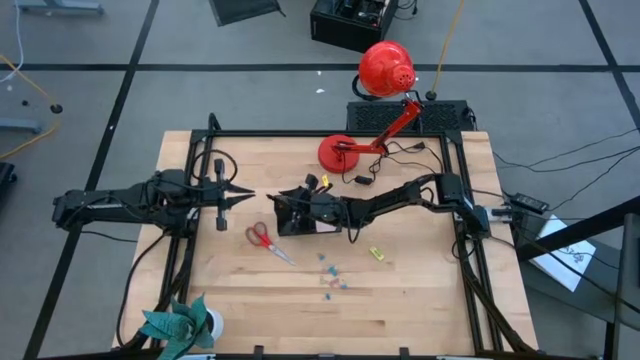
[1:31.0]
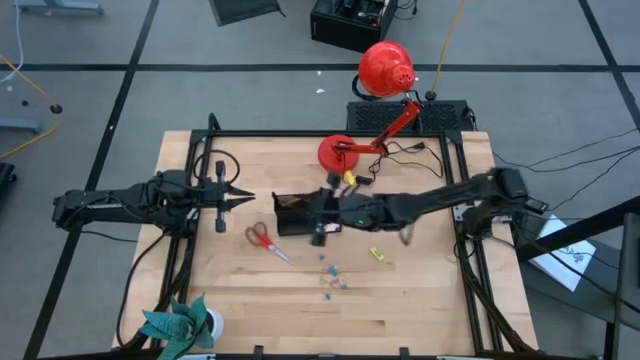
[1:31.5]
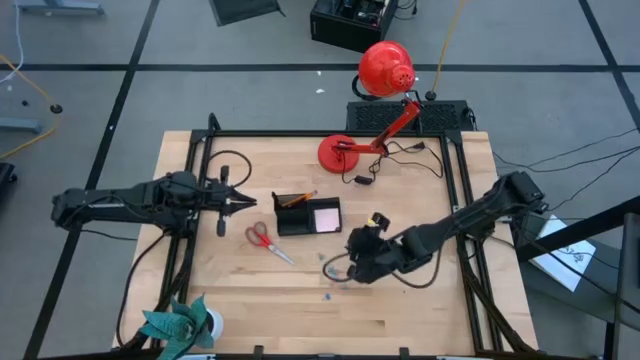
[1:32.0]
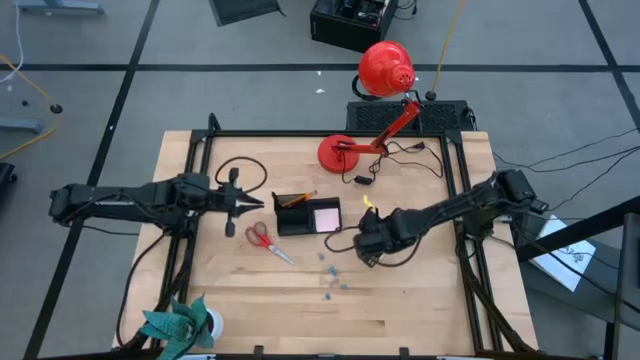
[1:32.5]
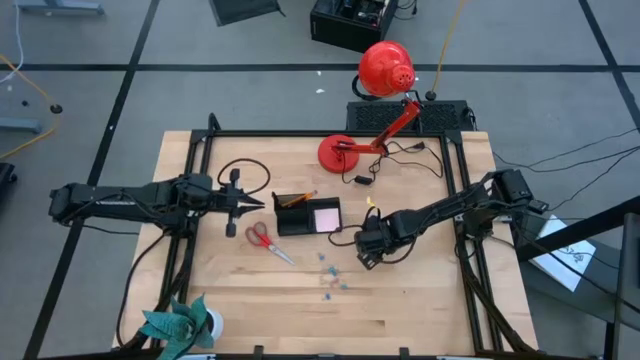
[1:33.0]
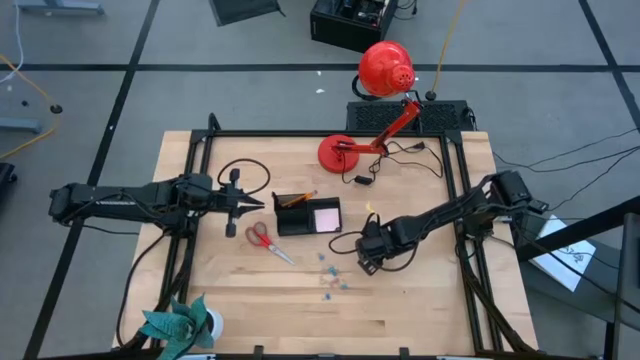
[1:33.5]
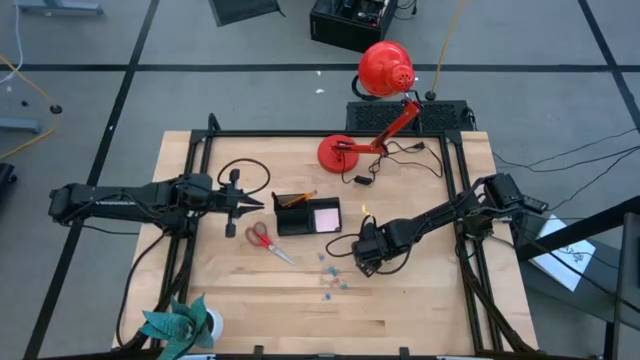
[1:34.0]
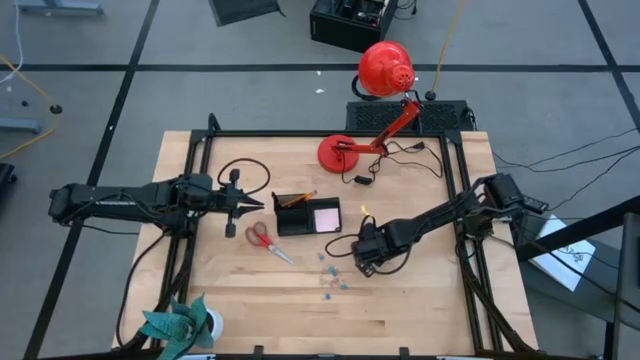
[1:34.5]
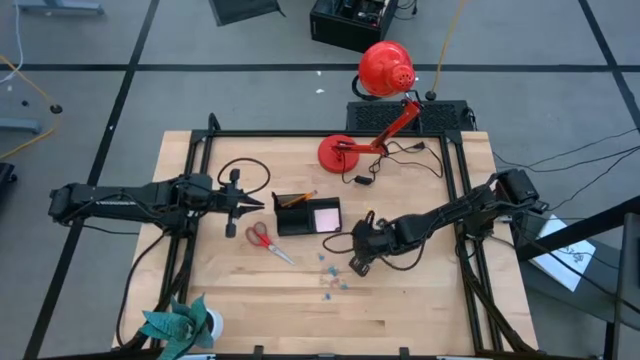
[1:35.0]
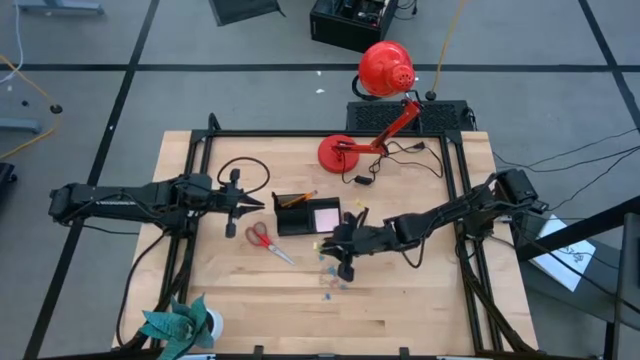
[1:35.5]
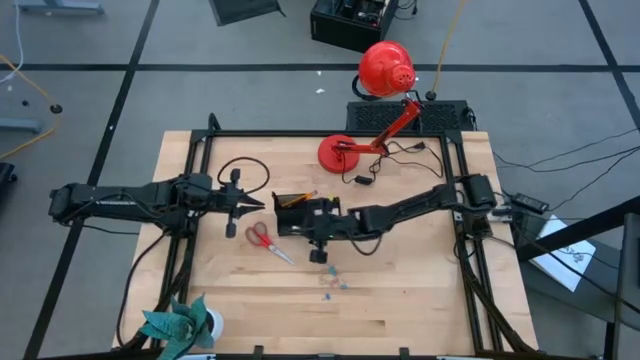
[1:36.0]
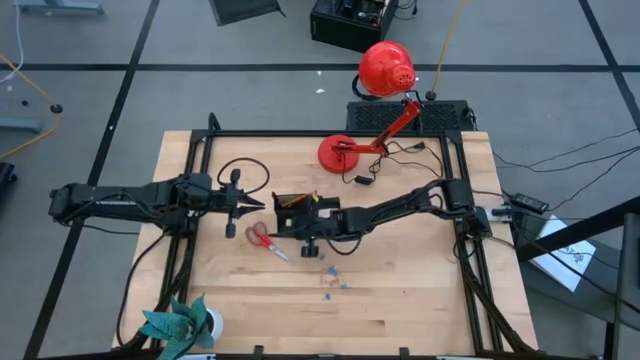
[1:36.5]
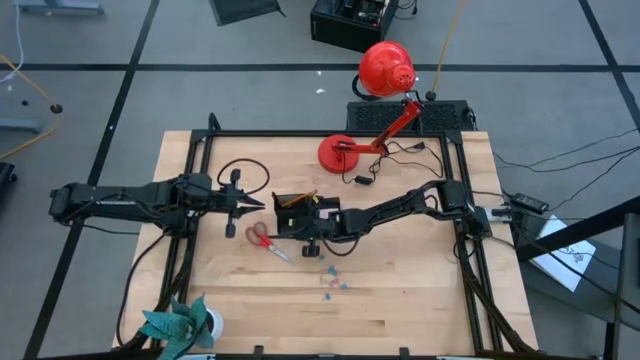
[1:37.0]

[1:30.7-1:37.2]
Task: Pick and place office supplies into organizer
Put the yellow eraser into the mesh desk organizer

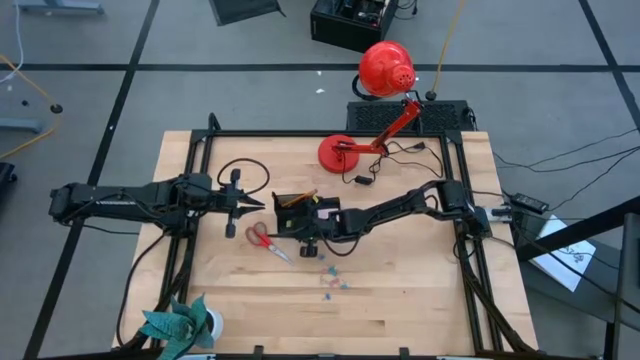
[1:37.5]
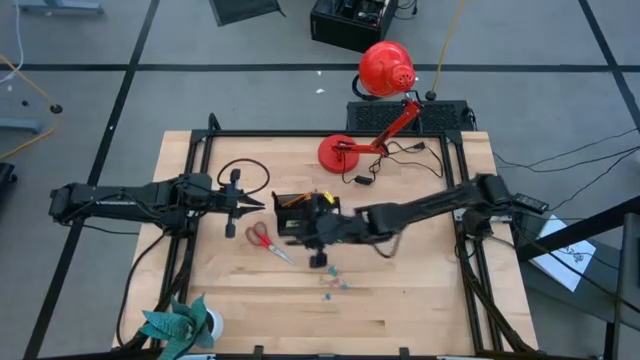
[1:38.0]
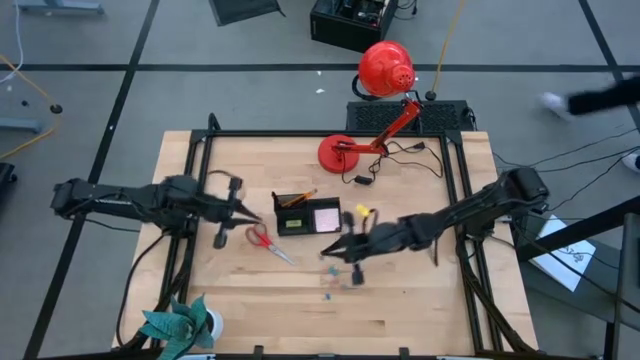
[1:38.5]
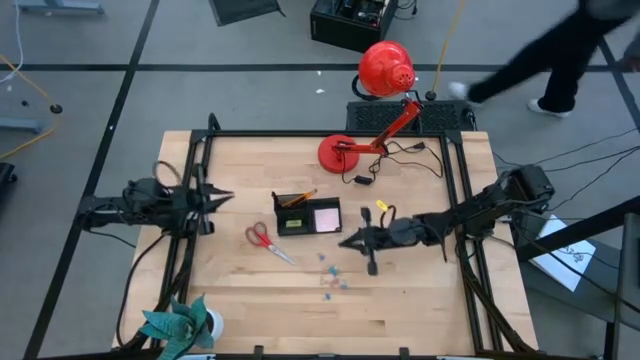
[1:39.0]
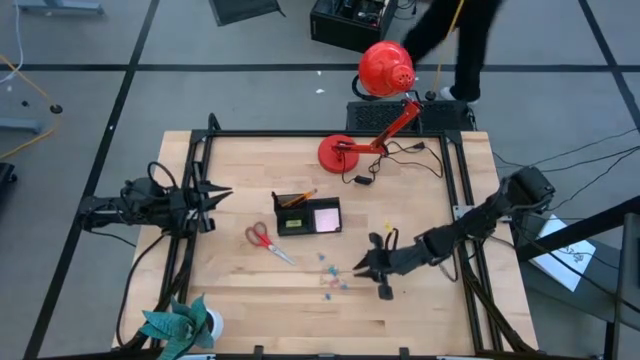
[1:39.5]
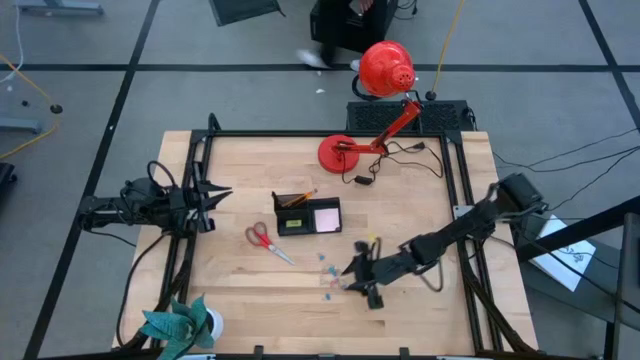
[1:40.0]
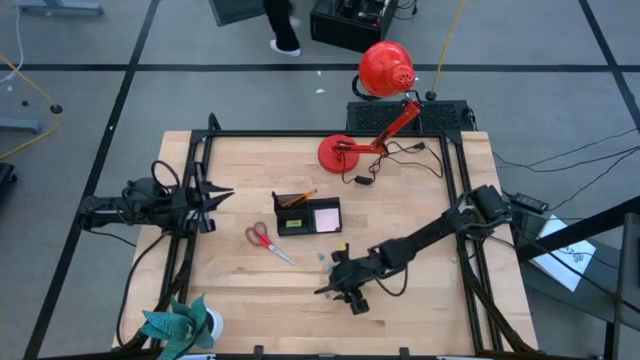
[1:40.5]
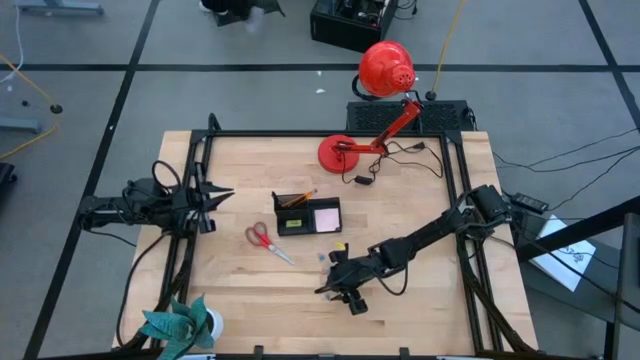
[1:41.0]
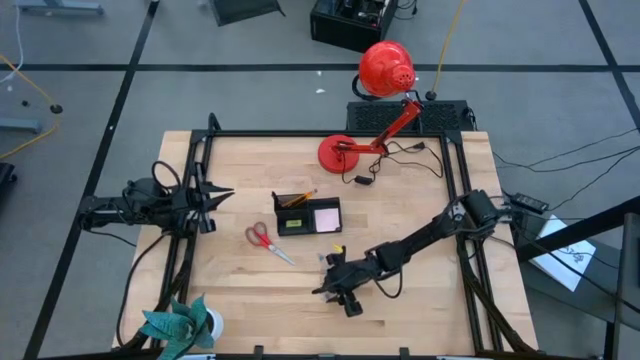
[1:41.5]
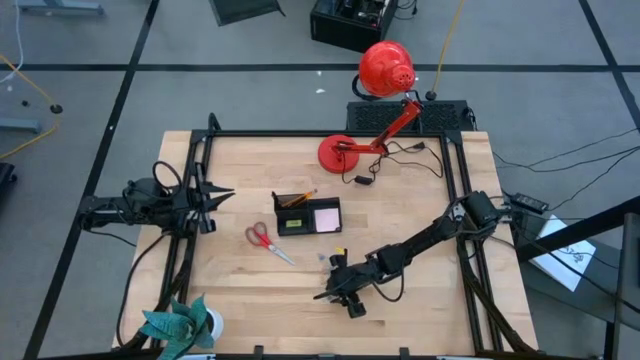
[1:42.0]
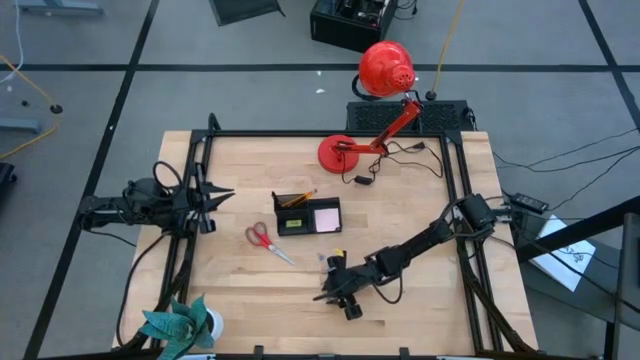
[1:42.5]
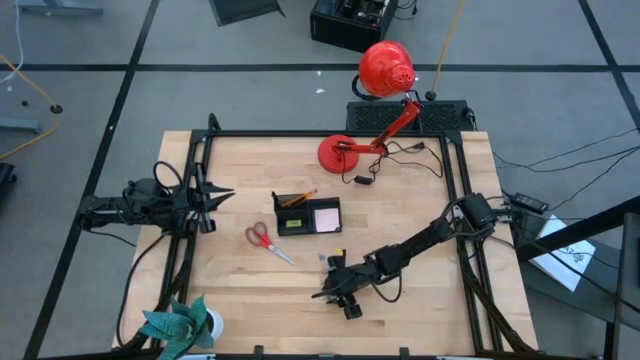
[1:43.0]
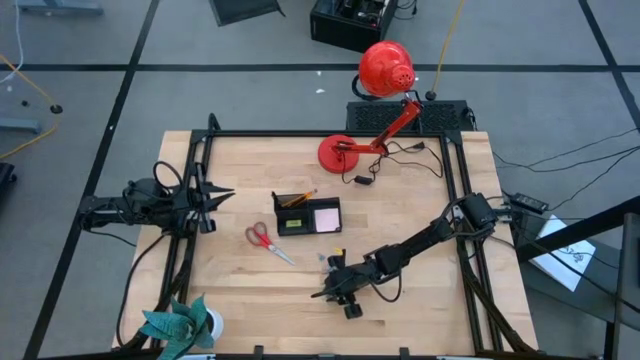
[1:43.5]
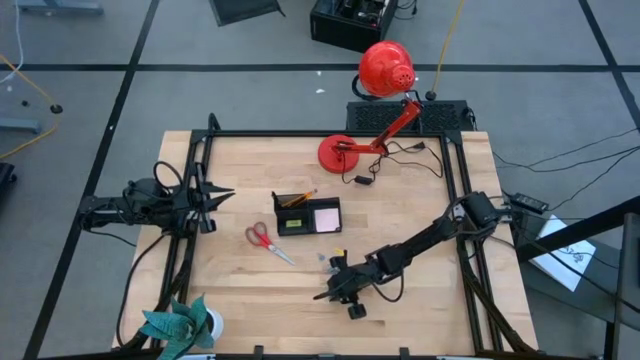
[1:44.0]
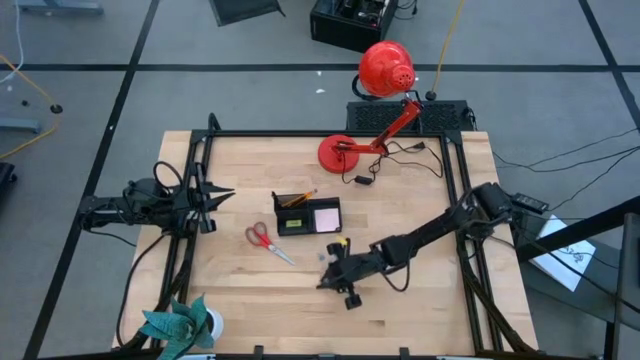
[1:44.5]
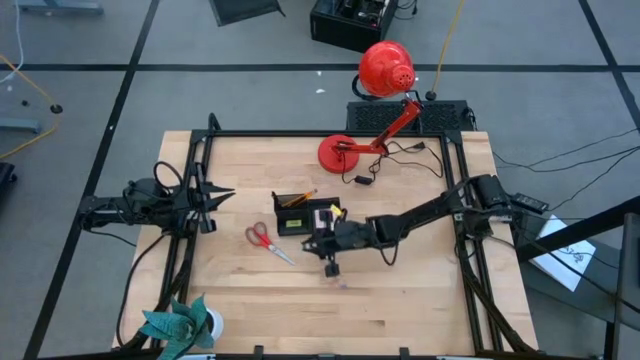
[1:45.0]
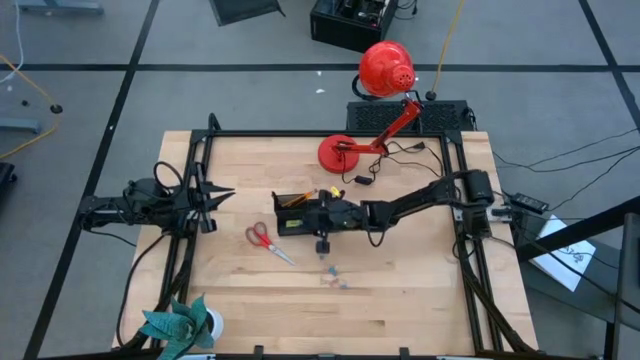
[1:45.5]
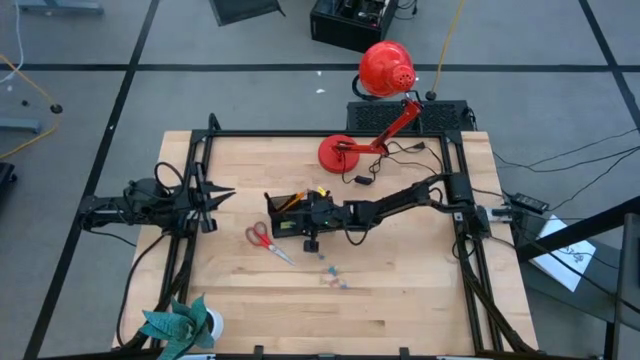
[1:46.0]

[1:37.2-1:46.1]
Put the blue binder clip into the mesh desk organizer

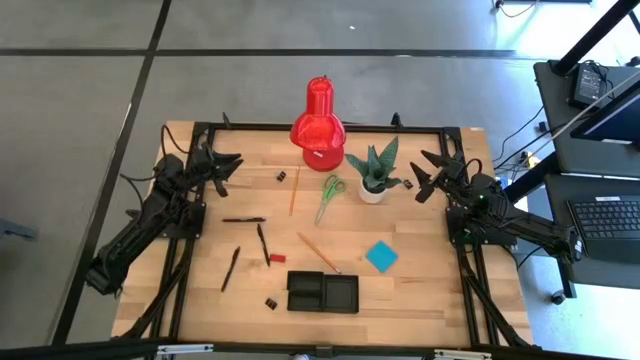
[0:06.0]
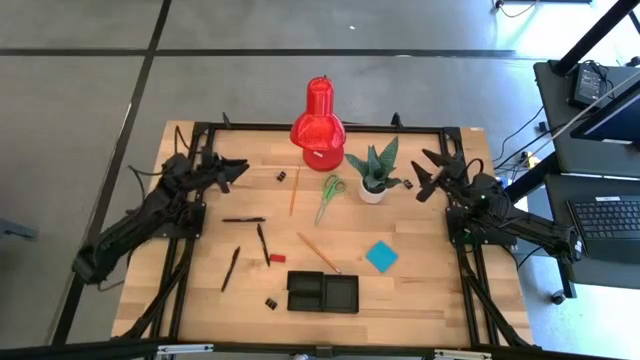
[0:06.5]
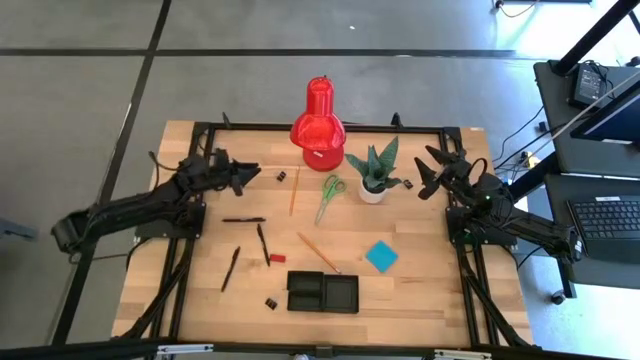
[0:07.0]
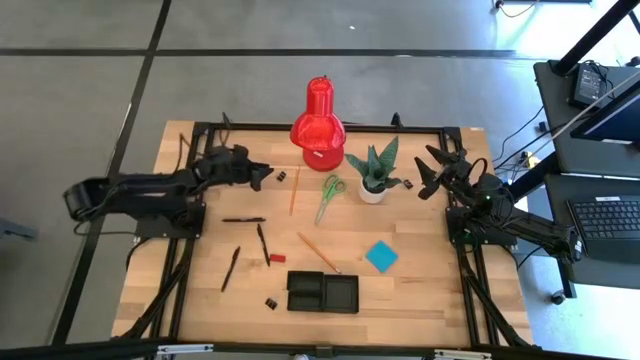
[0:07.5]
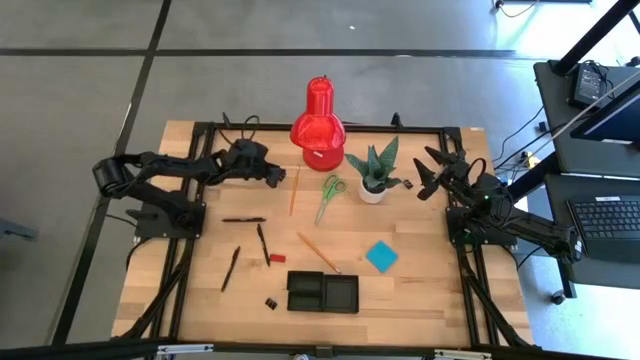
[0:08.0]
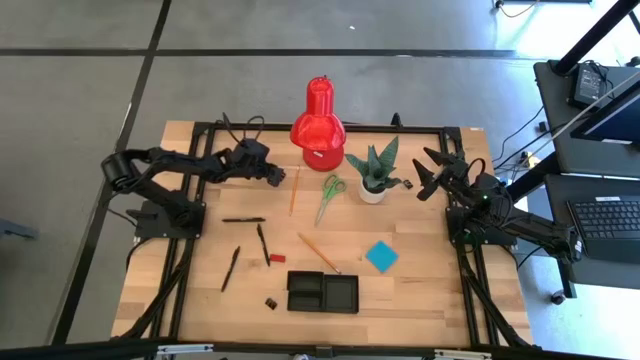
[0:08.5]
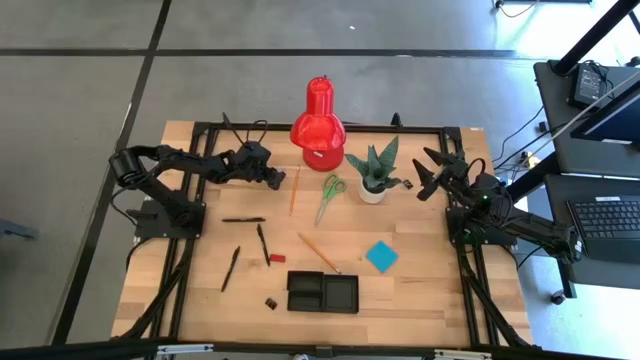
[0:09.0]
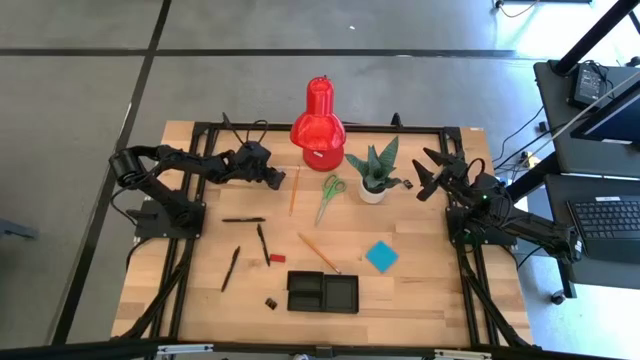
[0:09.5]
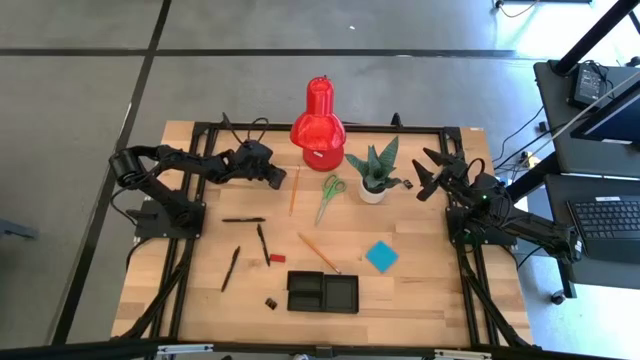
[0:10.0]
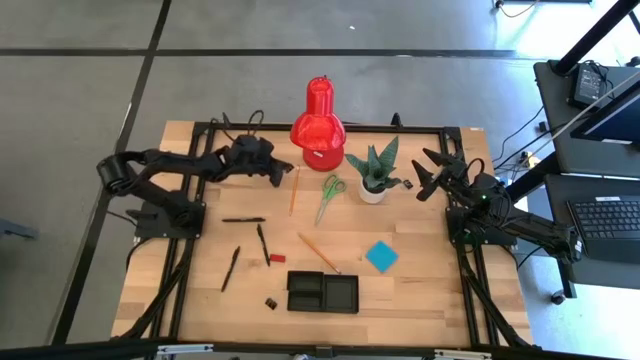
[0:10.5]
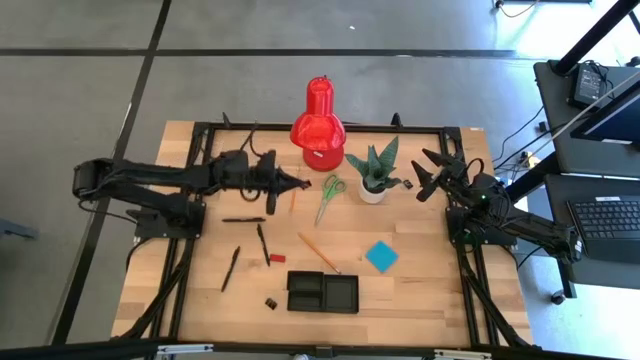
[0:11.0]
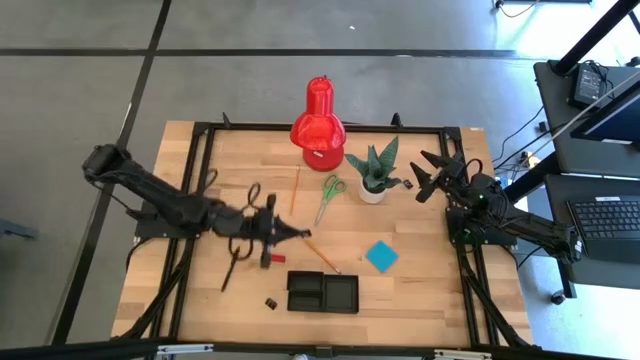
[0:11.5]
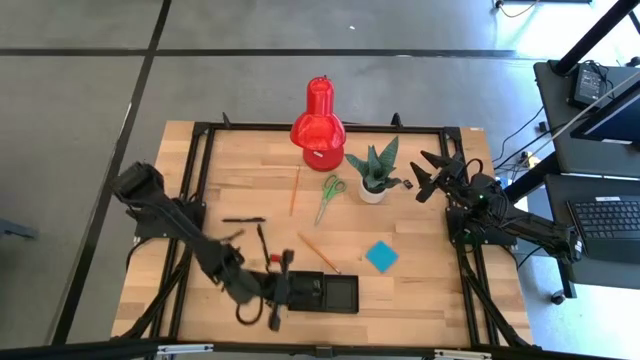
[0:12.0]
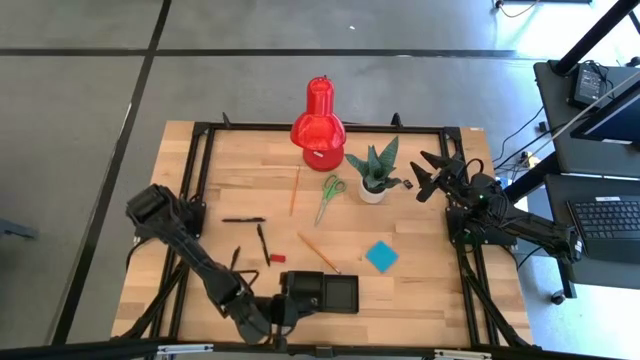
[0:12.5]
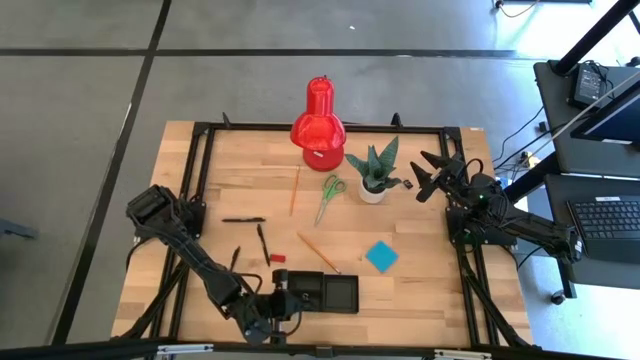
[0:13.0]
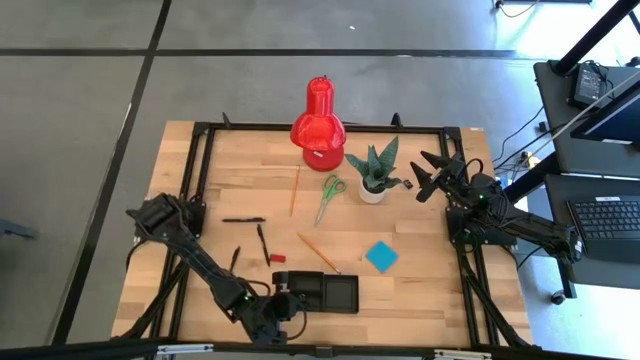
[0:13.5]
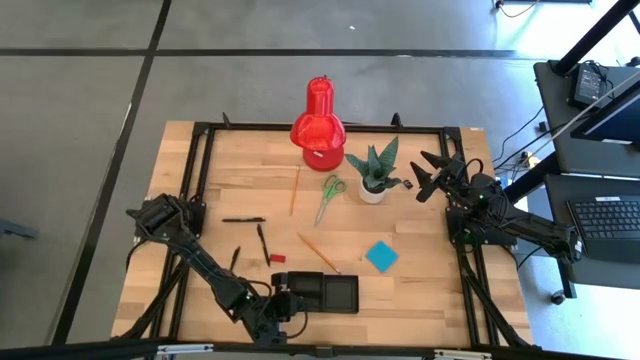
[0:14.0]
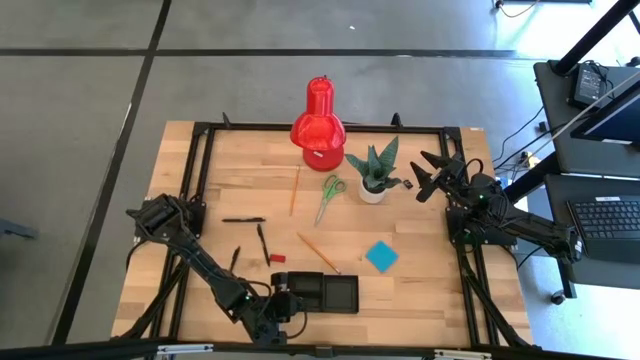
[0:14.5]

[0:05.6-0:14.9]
Task: Pick and place office supplies into organizer
Put the top left black binder clip into the desk organizer
